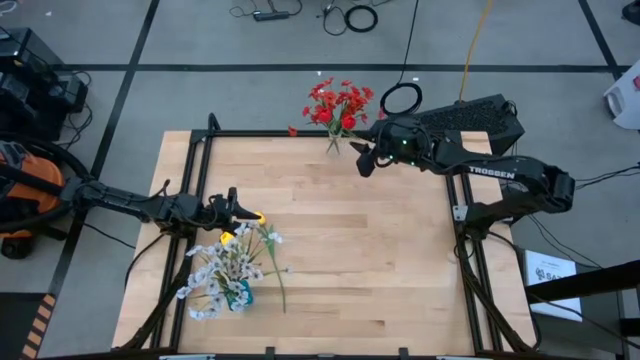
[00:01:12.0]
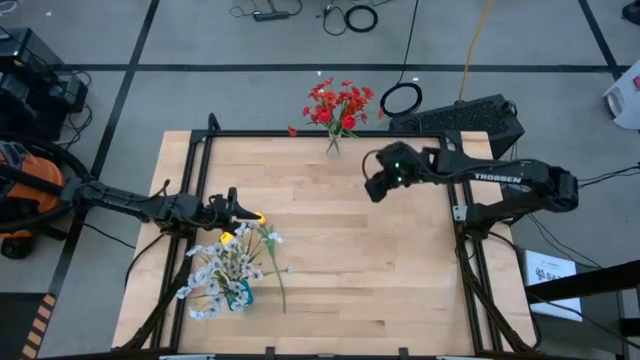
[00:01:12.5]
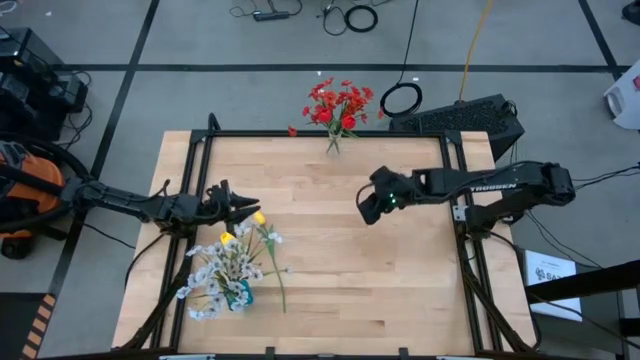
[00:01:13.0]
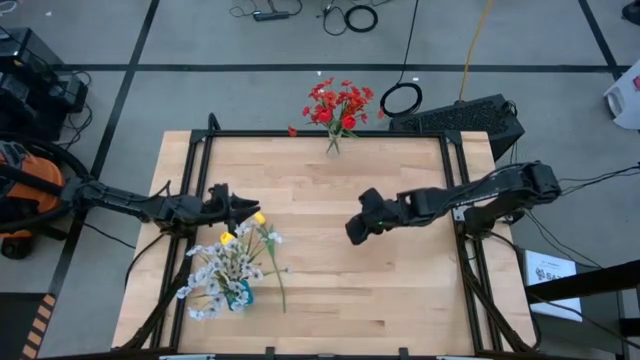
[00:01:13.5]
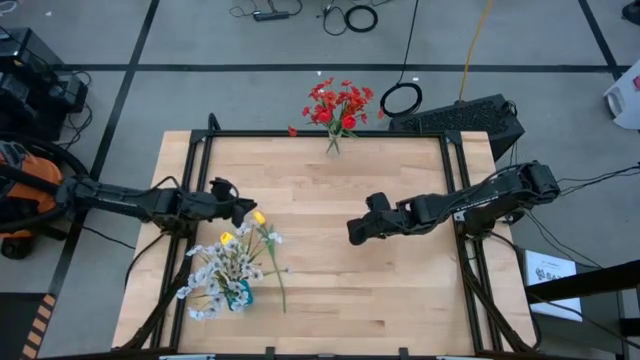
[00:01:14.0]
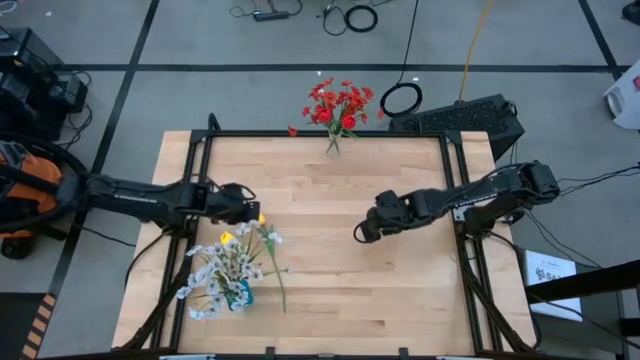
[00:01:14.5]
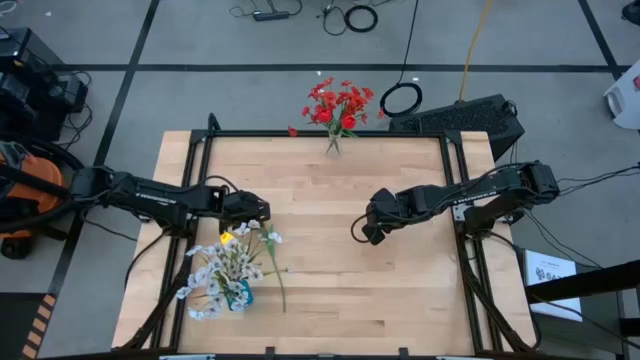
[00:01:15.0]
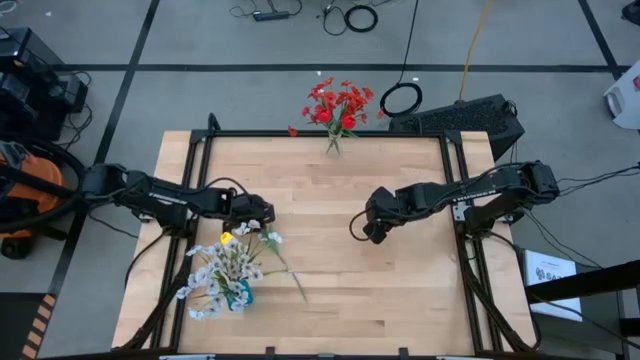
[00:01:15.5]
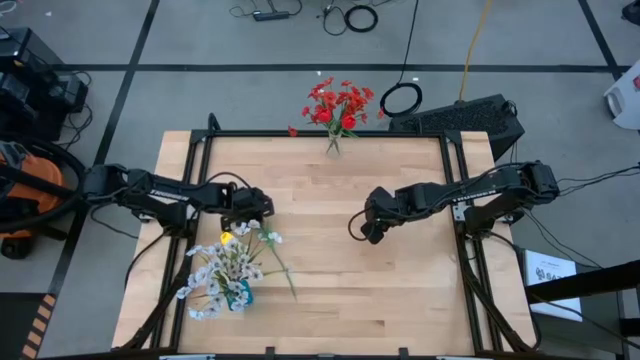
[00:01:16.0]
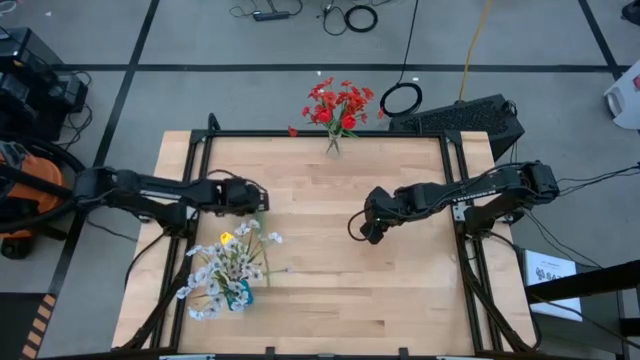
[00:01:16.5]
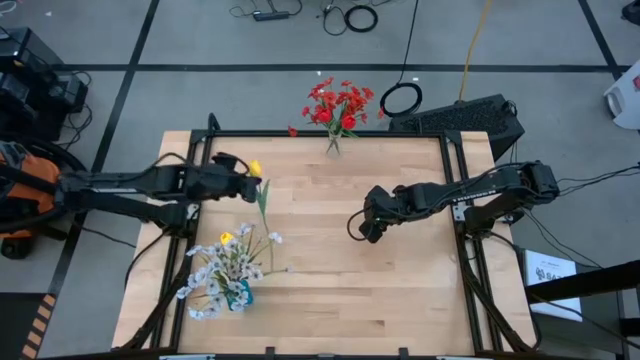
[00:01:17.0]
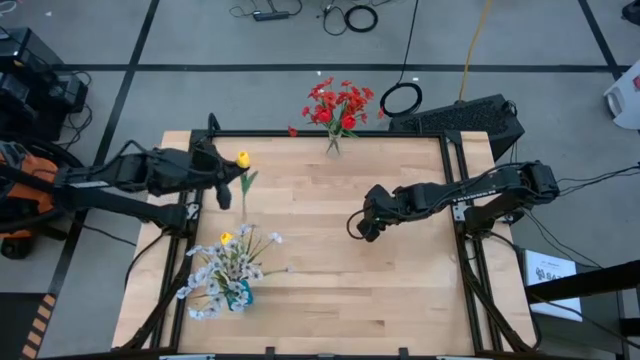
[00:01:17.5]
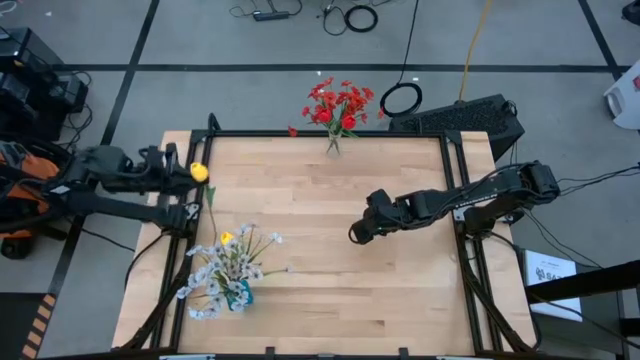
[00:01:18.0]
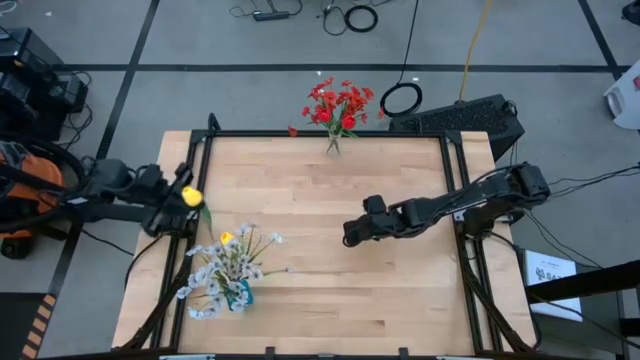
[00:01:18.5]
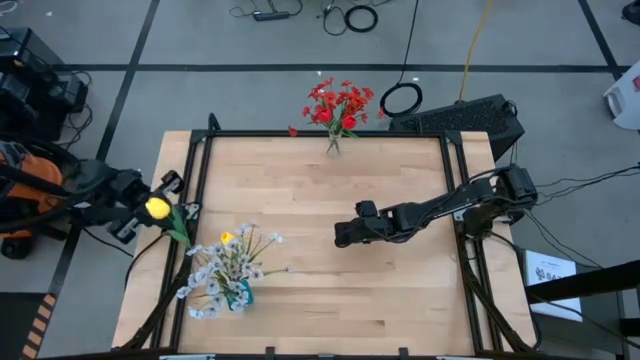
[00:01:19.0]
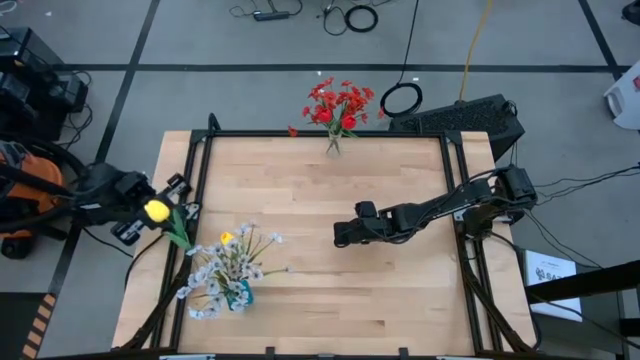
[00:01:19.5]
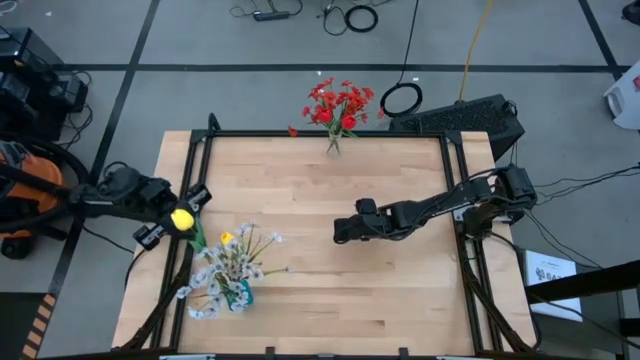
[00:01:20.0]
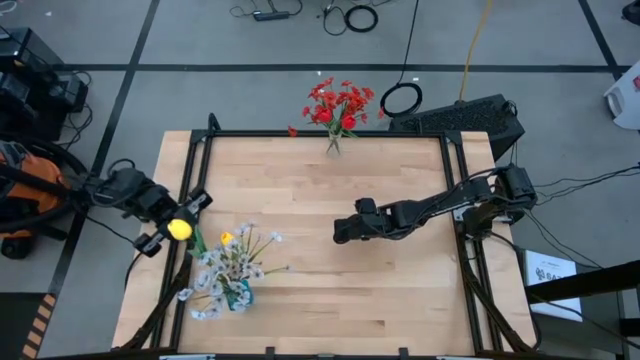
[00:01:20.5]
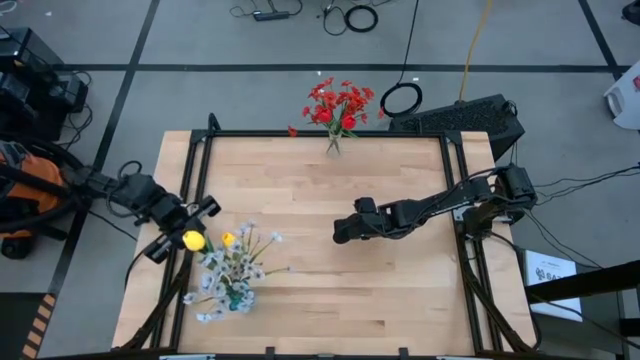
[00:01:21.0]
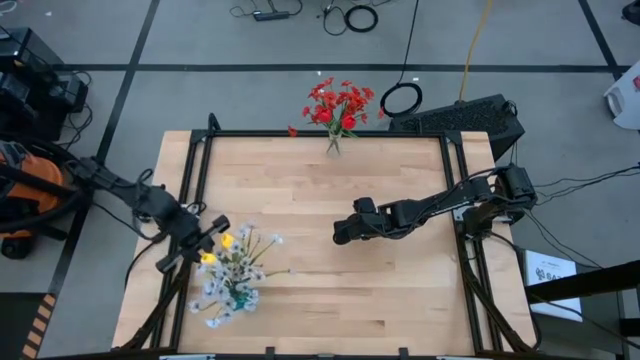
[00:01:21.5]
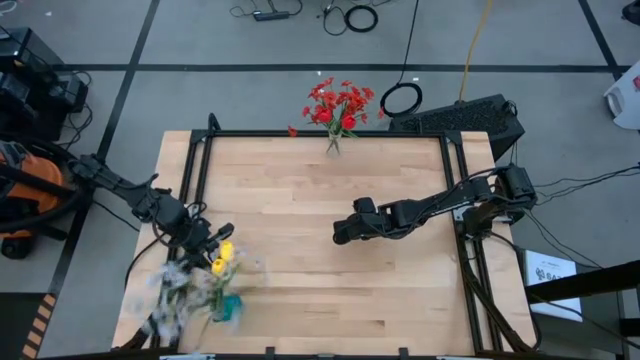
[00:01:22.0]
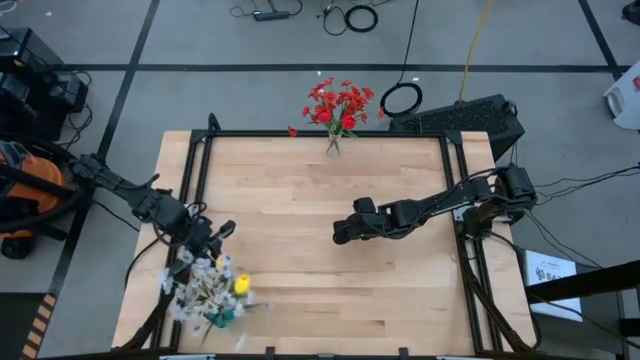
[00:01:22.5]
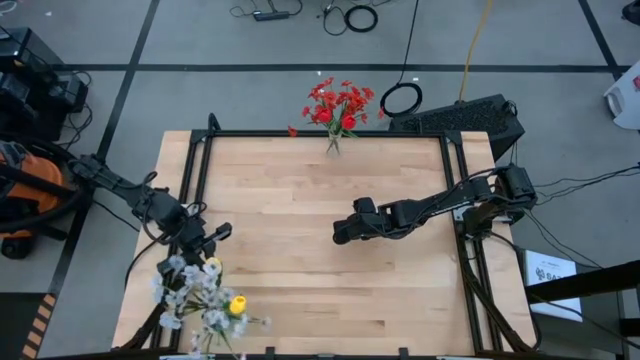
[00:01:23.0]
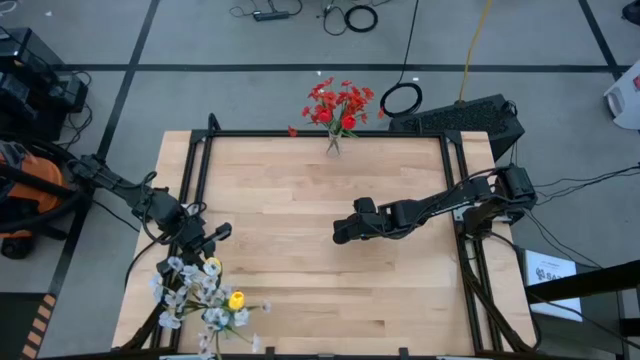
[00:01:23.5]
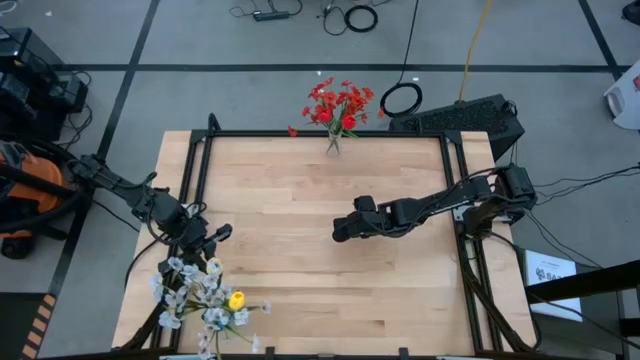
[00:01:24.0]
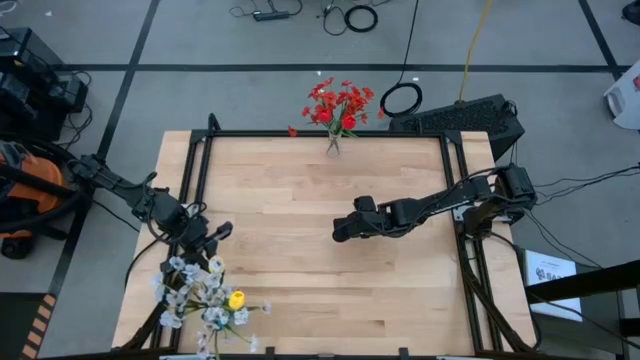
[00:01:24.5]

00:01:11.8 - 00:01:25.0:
Task: Sort flowers into vase by color
Put the yellow flower into the blue vase

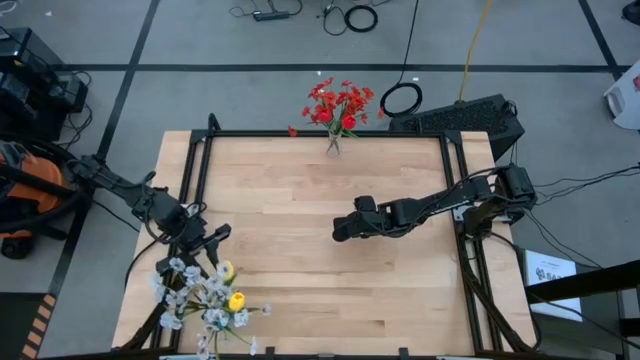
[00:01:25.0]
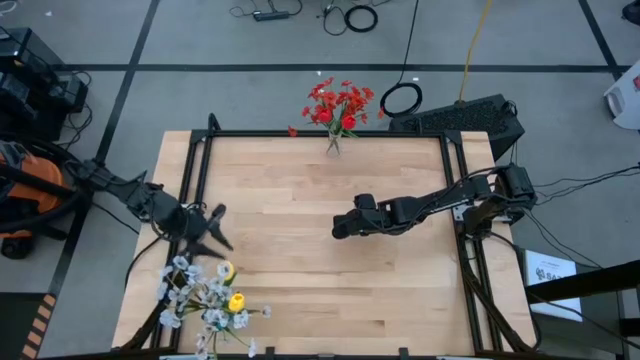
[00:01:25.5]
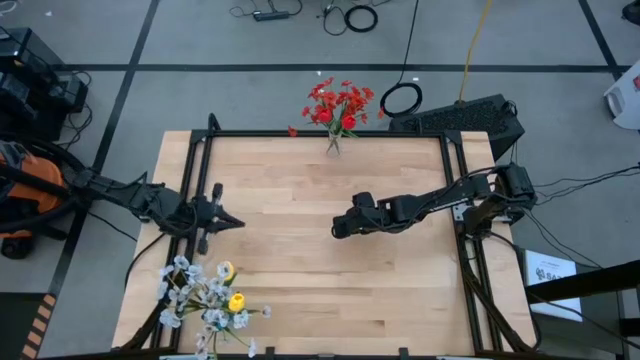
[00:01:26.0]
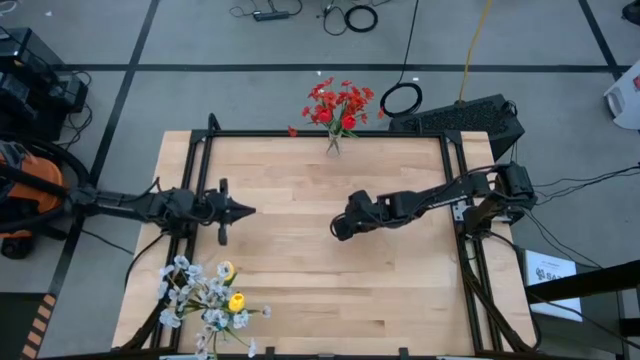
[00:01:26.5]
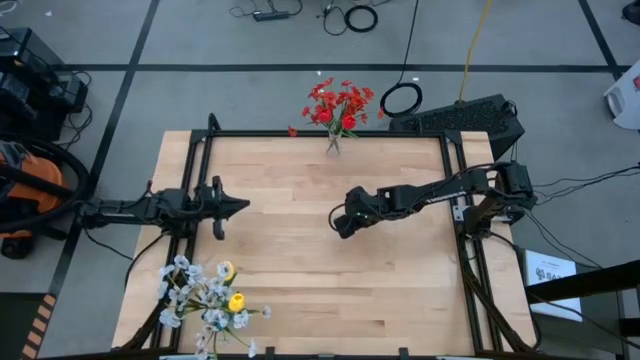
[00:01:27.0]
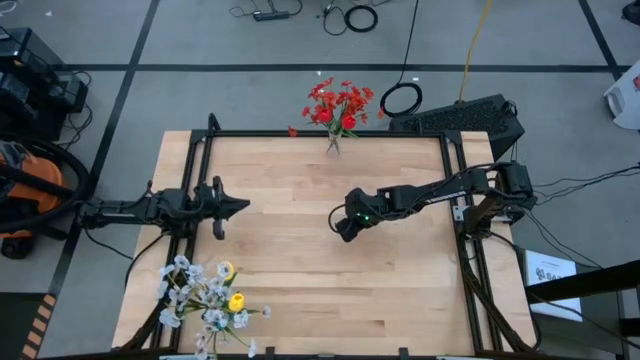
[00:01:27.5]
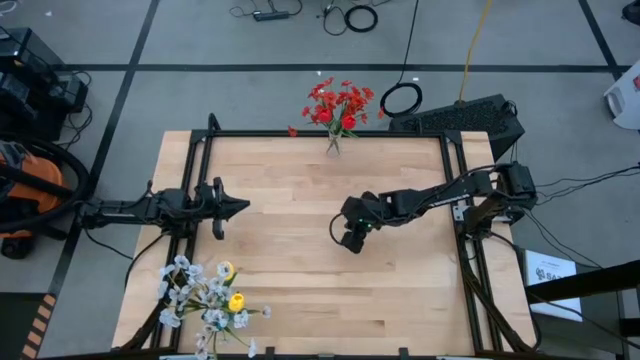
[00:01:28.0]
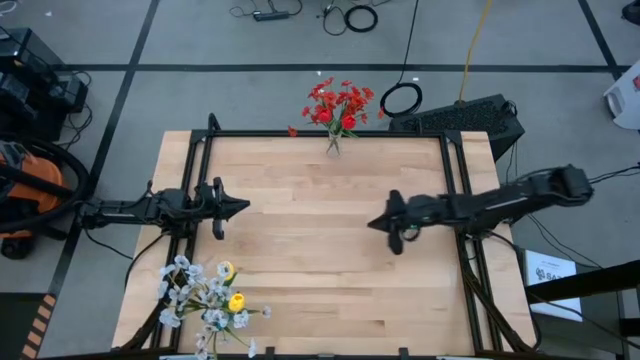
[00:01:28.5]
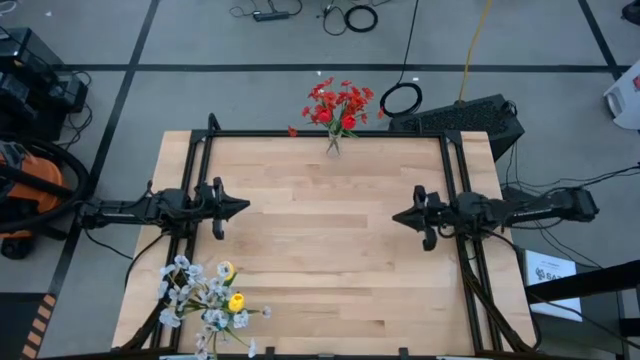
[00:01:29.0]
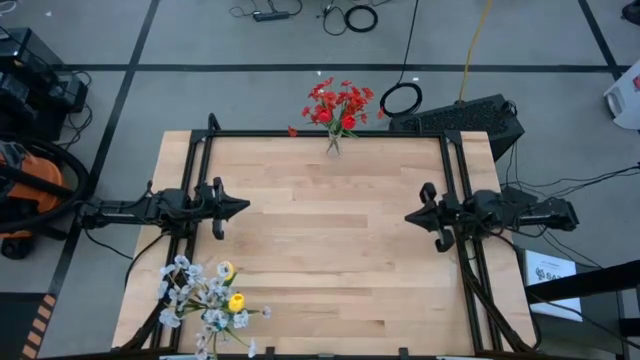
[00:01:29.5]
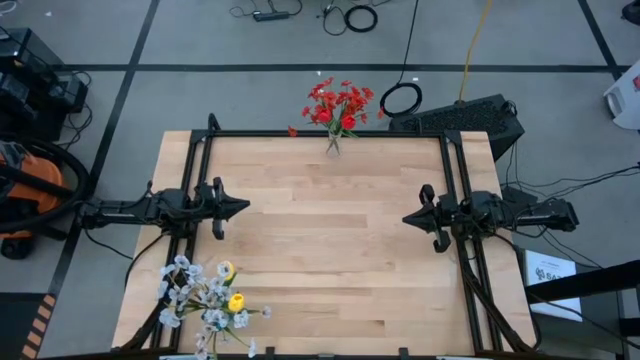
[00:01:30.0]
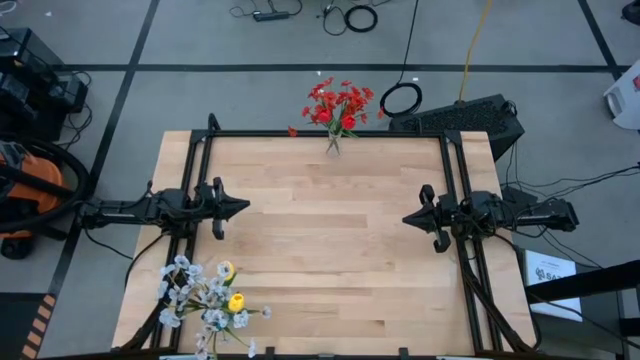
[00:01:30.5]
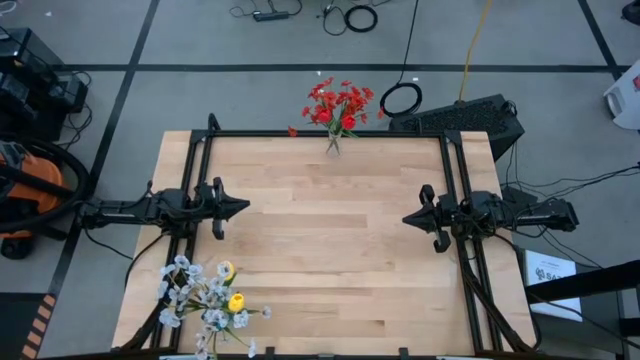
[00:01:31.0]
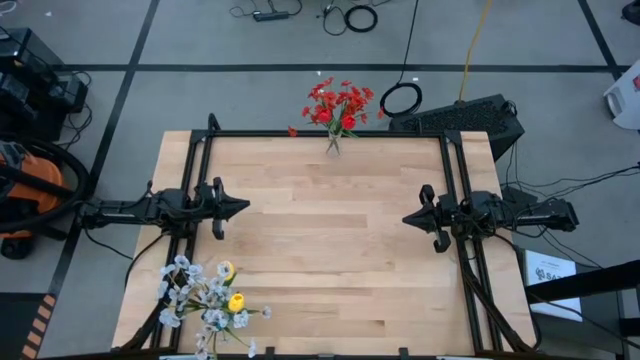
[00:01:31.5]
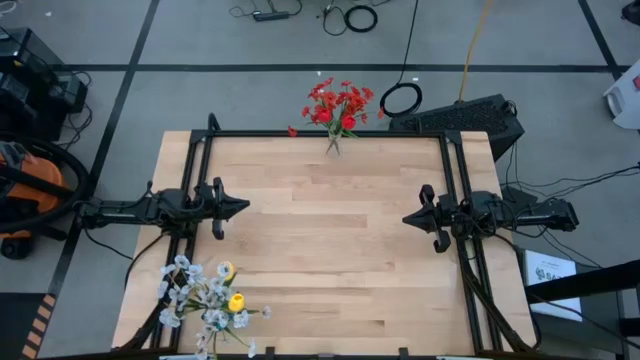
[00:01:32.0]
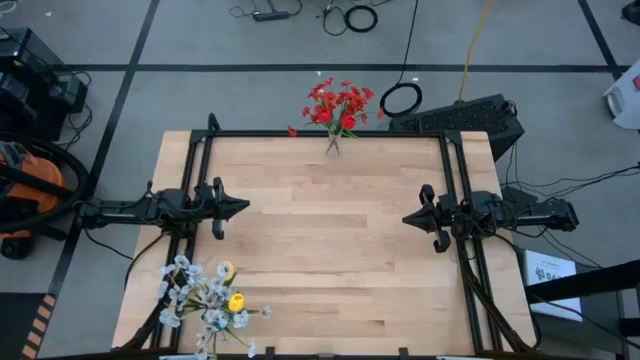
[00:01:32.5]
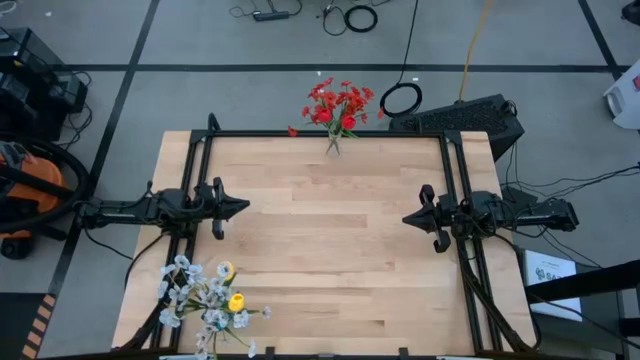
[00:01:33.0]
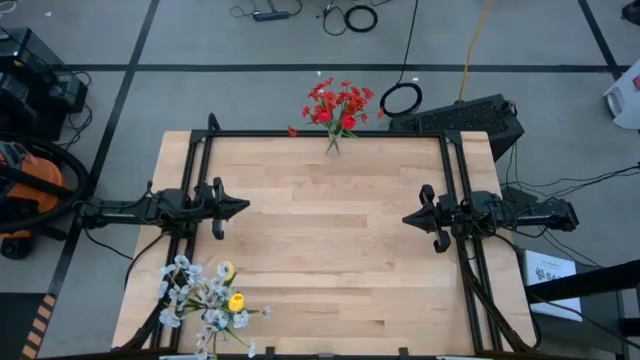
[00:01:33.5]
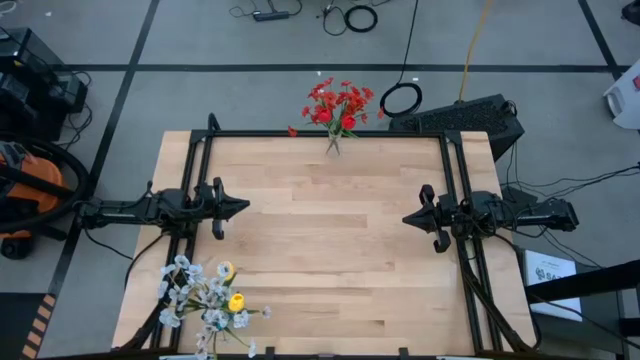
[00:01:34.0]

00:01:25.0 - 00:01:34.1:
Return to Home Position
